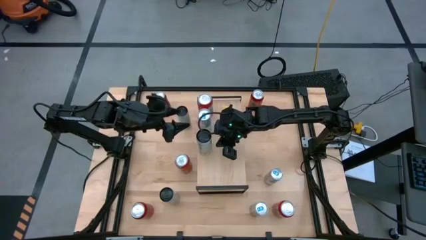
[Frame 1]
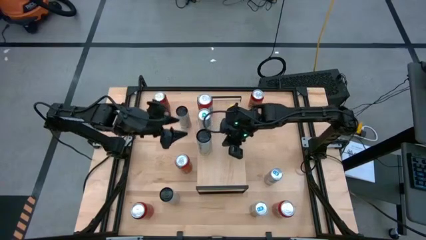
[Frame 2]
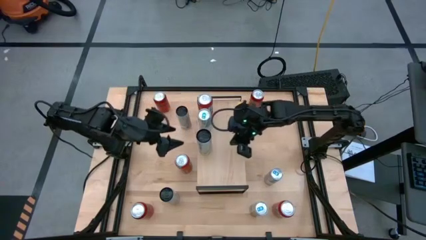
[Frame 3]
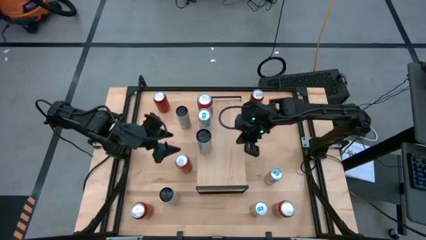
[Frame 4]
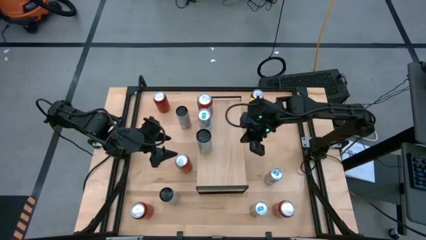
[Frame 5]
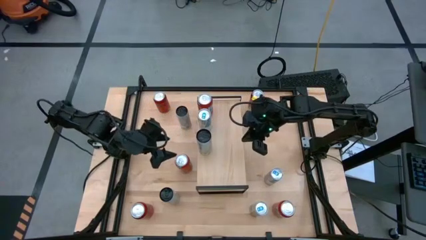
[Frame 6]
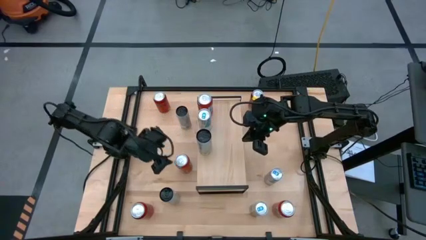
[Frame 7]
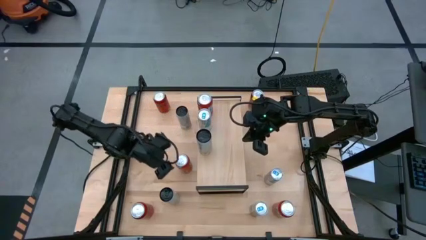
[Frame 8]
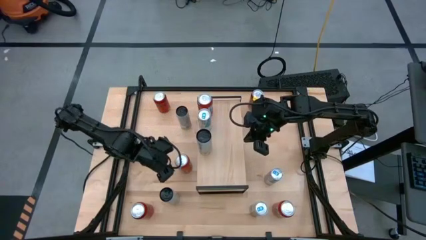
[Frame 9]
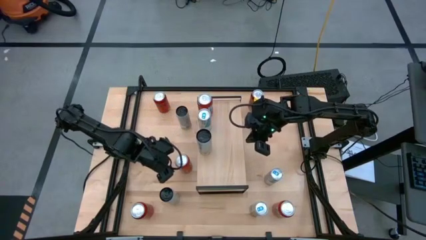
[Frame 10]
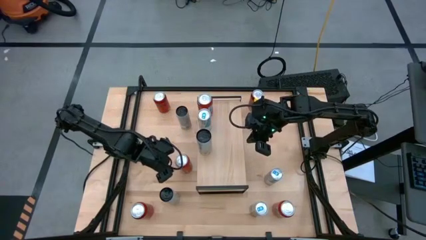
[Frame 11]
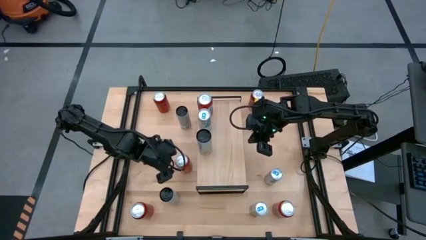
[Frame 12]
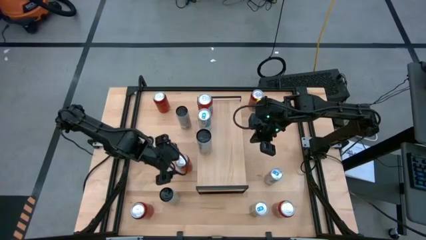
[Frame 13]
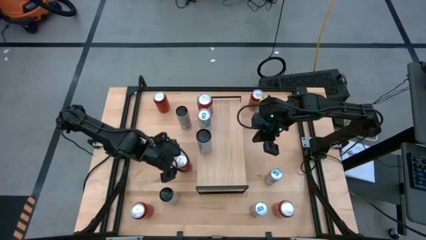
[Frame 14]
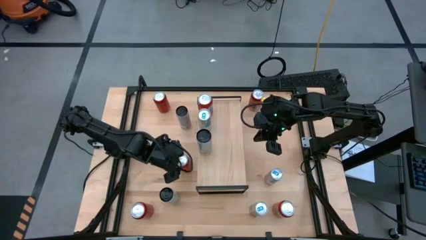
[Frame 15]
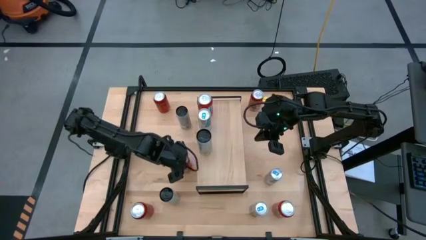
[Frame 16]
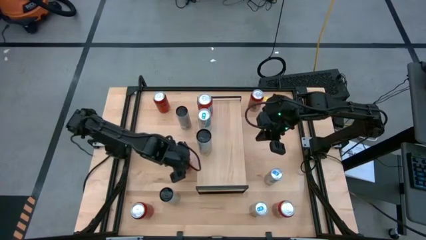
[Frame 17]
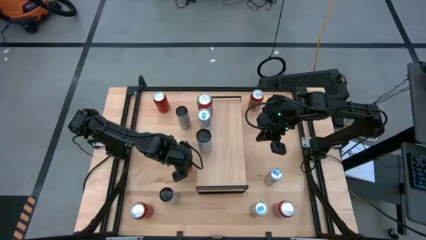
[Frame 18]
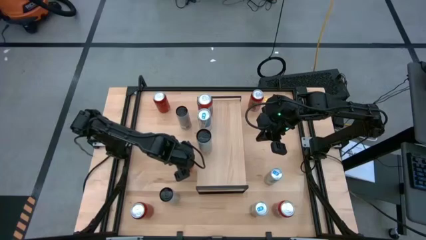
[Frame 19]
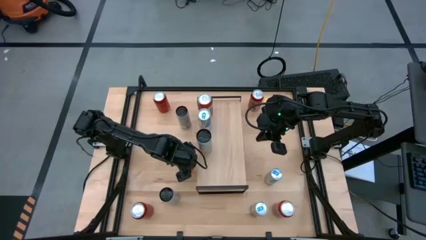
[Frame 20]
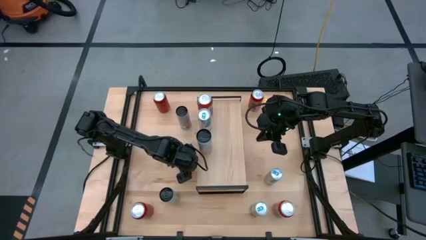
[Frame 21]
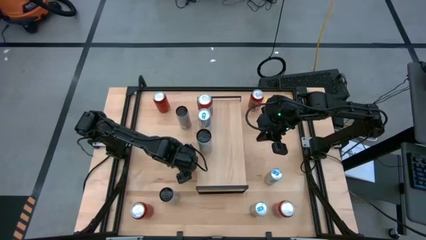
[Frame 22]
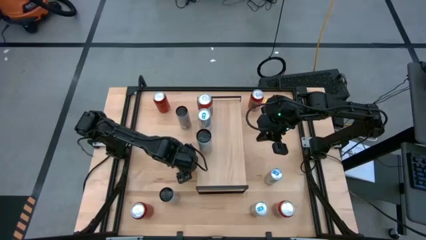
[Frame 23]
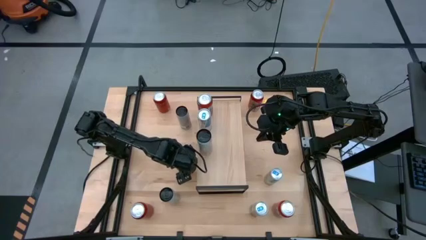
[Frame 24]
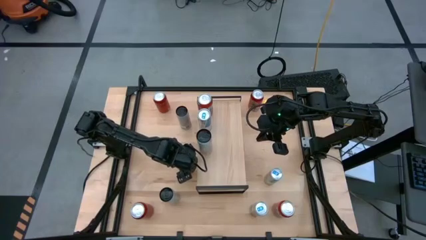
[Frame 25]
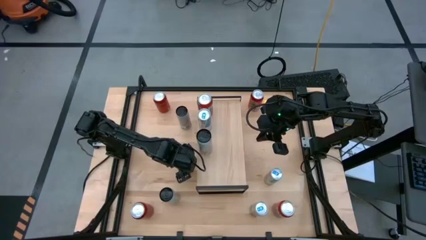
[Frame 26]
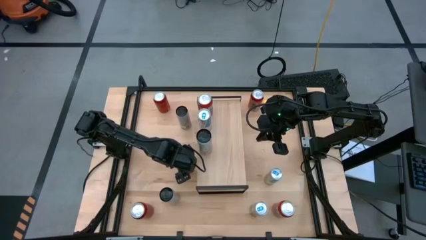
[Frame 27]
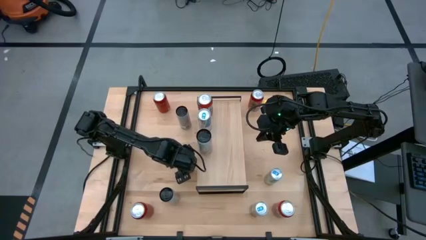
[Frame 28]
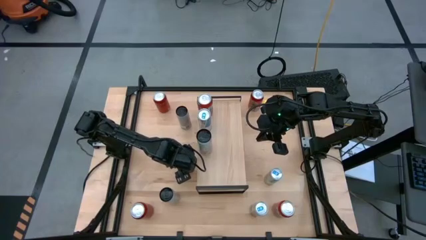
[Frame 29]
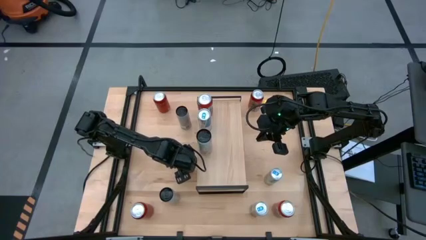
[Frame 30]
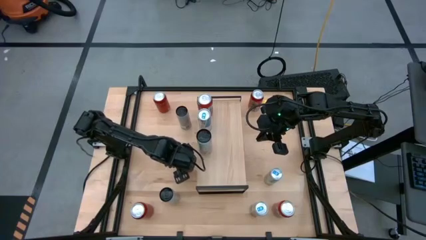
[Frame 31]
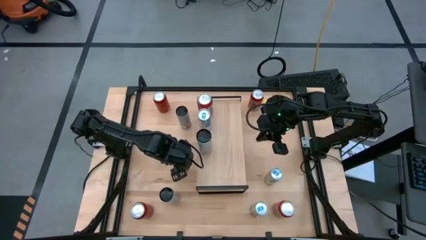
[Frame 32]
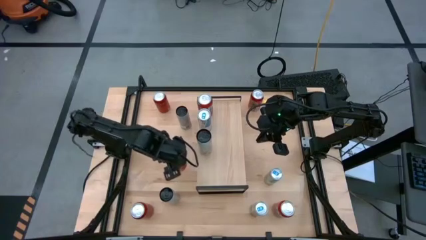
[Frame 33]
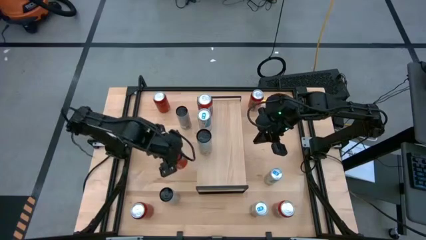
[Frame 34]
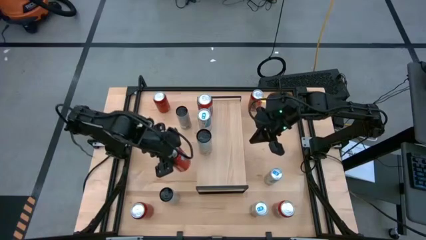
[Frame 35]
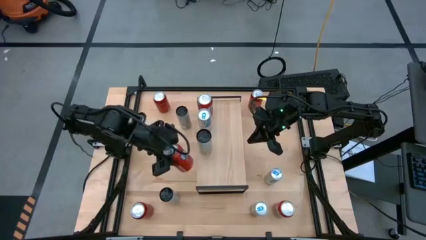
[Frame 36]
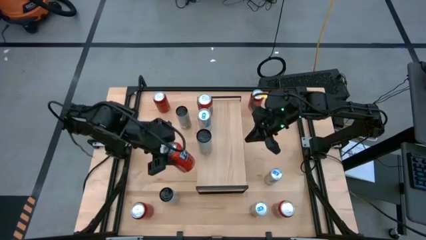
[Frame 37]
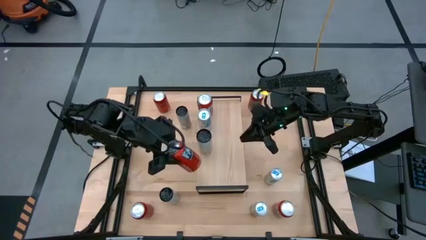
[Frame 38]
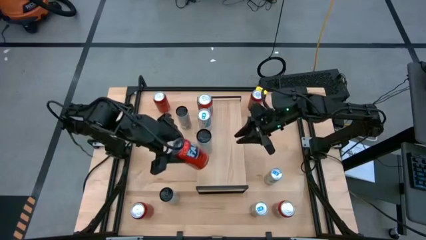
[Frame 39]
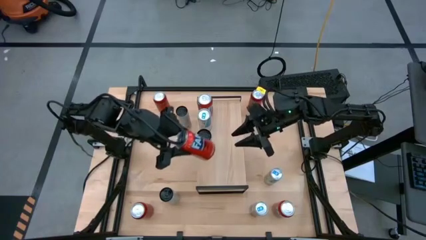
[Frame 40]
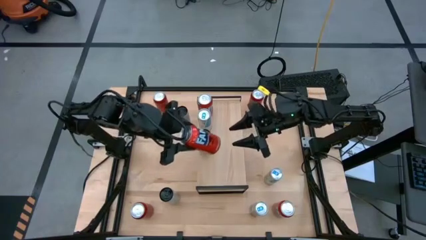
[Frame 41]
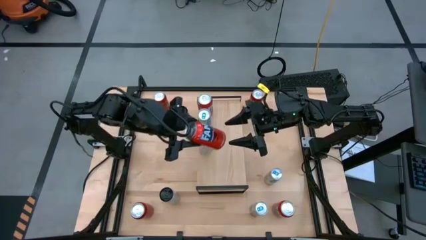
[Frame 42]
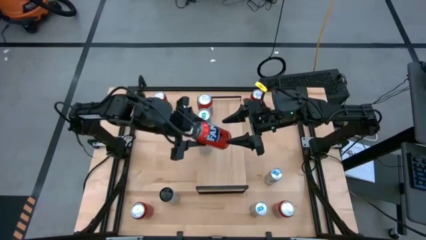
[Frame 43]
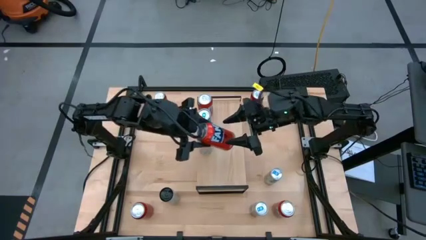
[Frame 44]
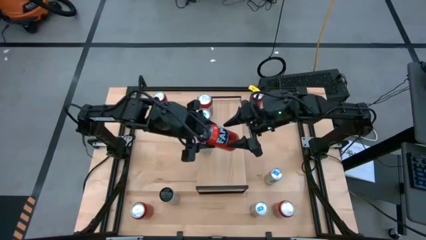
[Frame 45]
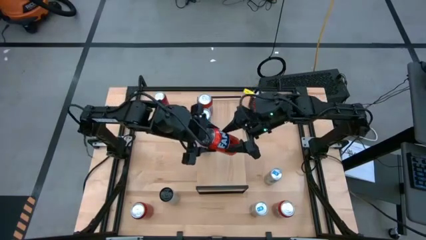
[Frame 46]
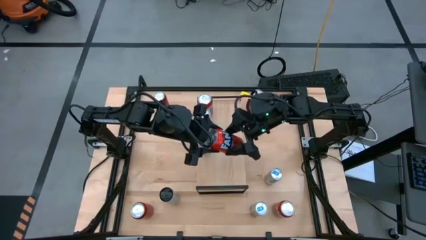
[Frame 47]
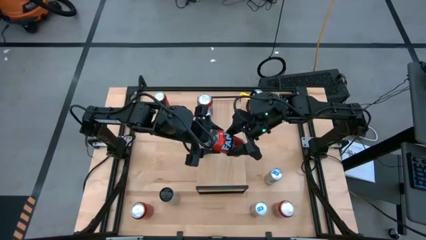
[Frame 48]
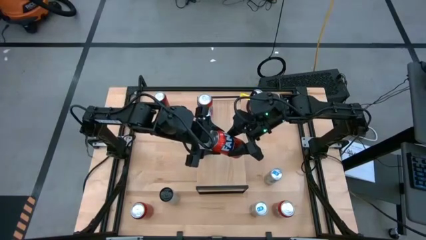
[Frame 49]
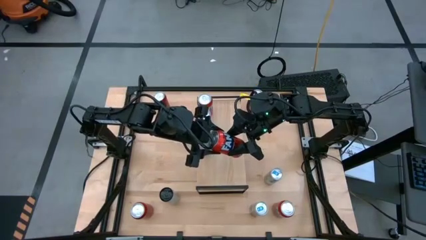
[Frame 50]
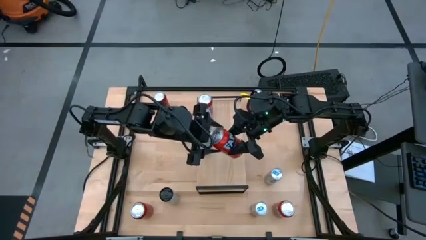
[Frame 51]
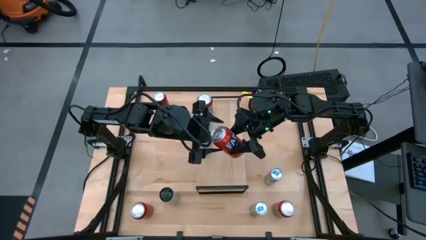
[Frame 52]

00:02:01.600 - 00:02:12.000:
Task: Place canned beverage on shelf
Put the left orange soda can on the shelf aligned with the other orange soda can
